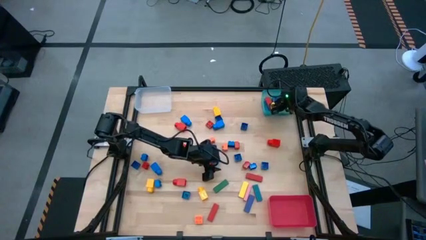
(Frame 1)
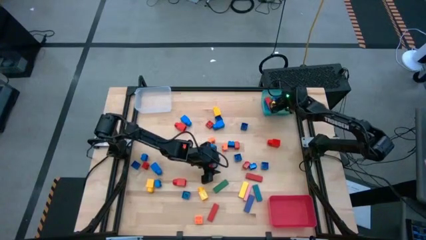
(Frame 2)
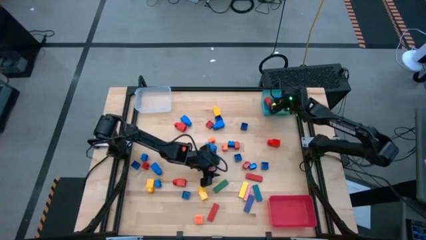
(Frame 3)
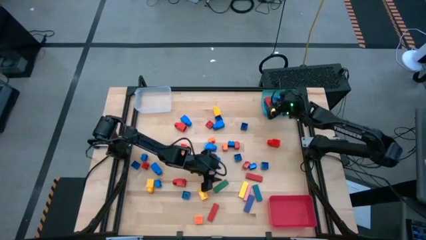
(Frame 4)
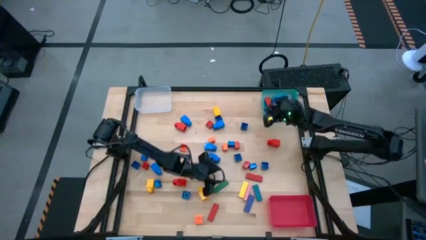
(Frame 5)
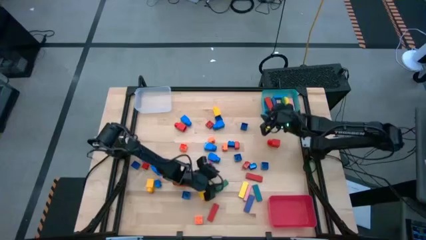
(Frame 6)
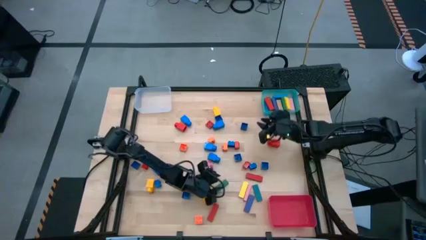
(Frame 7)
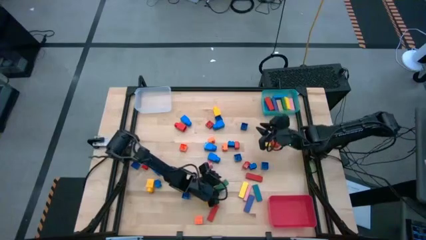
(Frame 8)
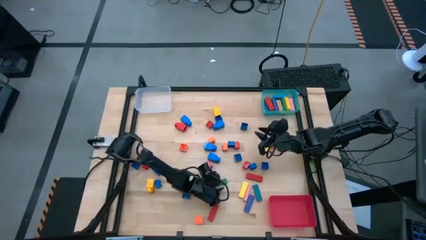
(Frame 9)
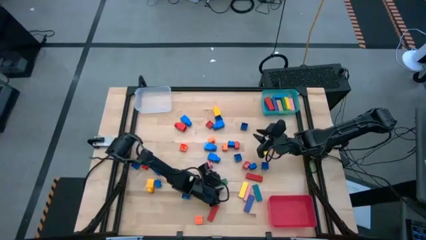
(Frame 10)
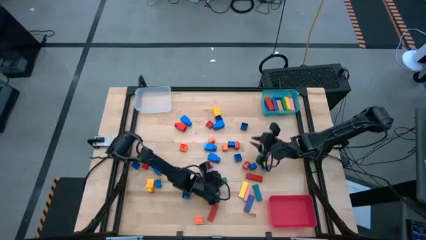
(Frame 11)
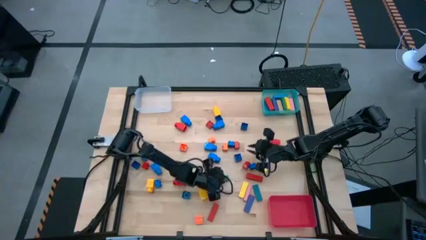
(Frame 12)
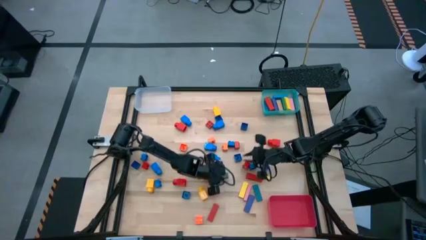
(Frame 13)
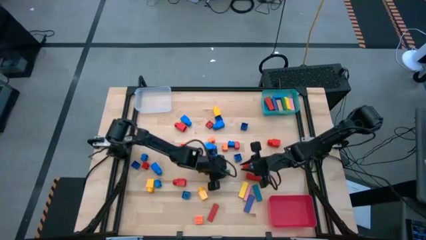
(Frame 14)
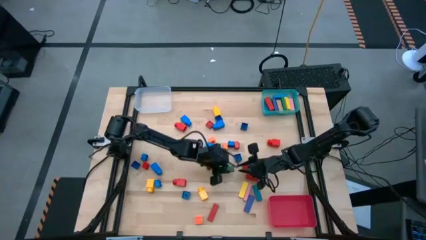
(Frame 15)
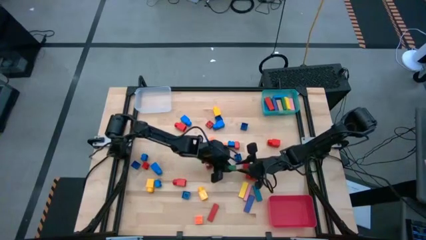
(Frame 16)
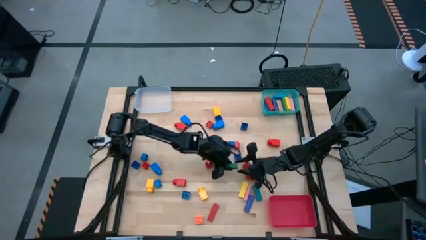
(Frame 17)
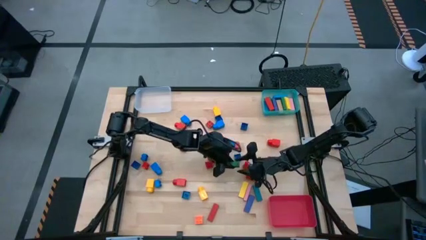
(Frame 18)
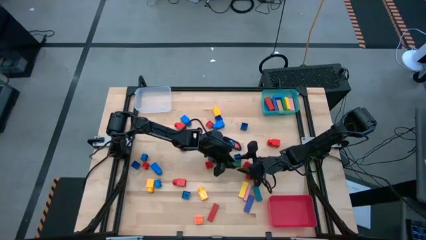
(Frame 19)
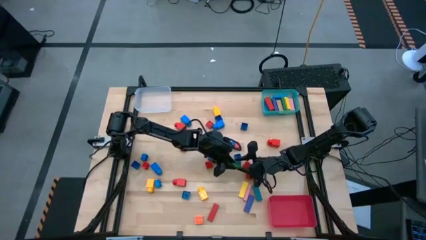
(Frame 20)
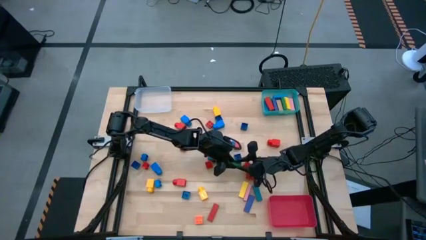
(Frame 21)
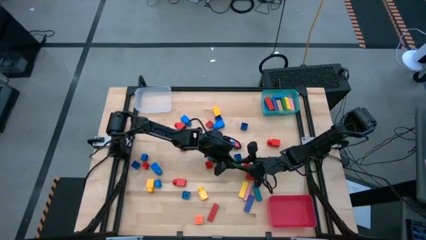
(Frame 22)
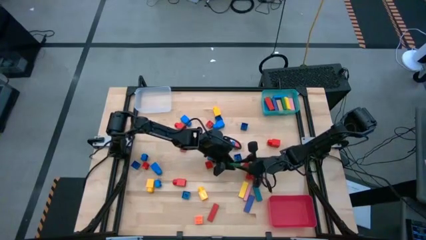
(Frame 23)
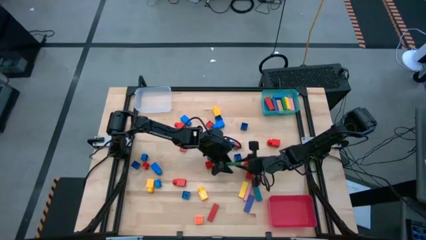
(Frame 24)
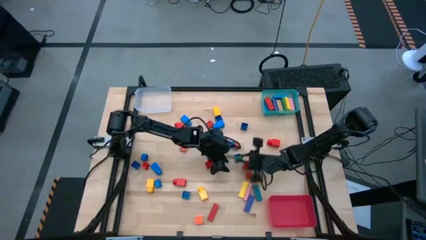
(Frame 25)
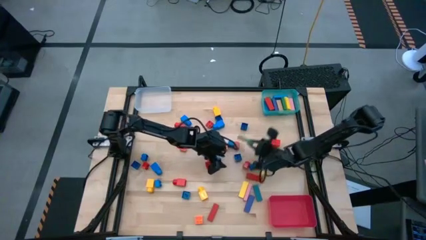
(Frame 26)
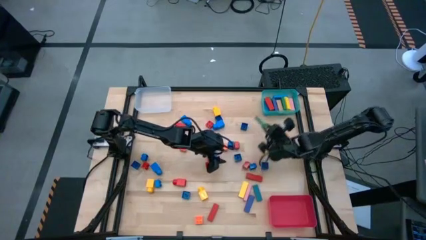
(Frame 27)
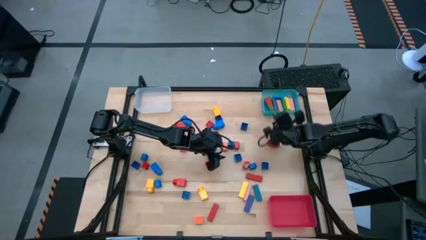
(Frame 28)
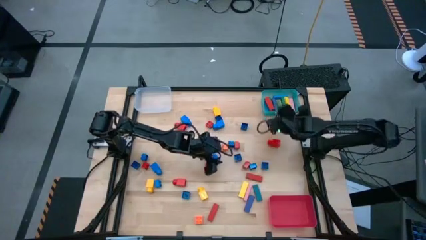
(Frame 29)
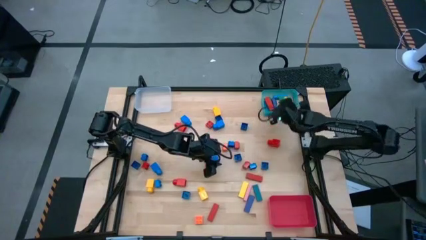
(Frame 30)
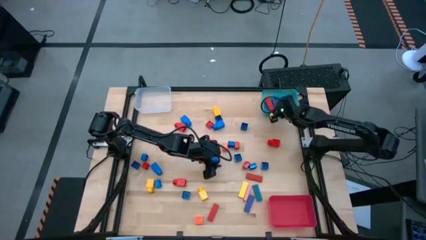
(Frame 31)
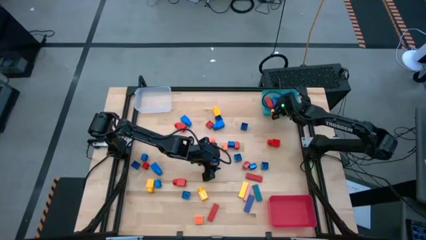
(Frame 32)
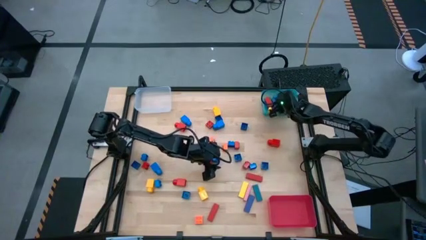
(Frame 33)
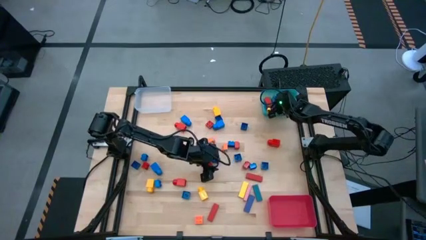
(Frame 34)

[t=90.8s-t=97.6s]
Task: Sort blocks by size
Put the green block into the blue bin

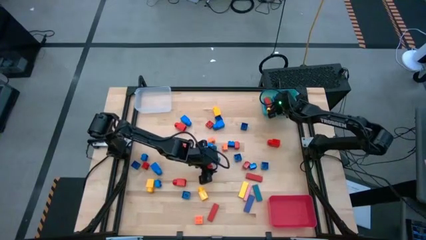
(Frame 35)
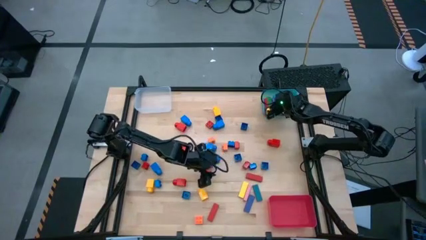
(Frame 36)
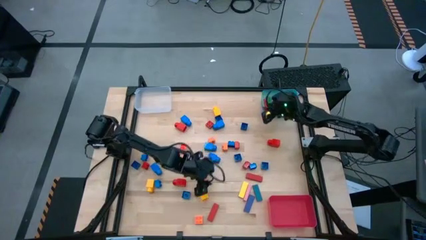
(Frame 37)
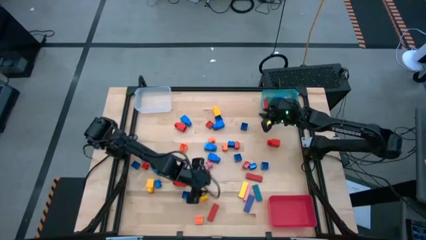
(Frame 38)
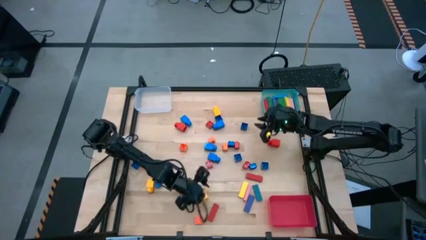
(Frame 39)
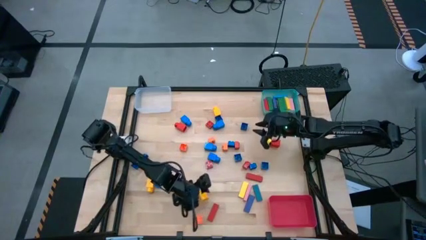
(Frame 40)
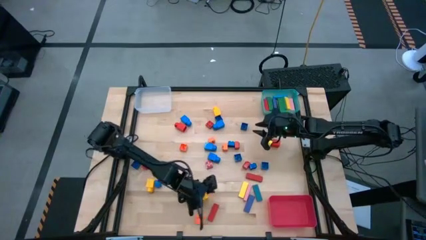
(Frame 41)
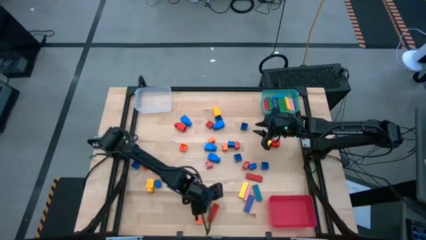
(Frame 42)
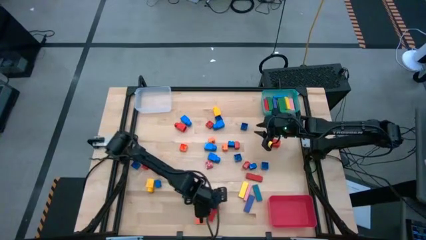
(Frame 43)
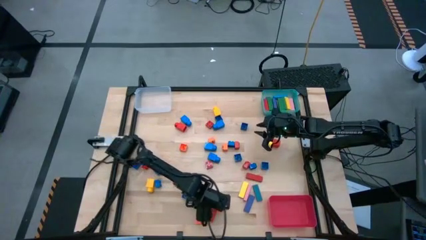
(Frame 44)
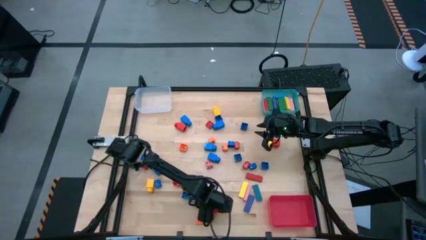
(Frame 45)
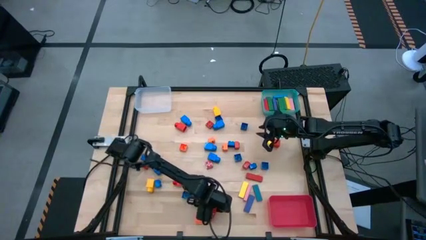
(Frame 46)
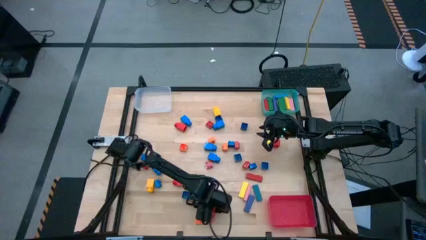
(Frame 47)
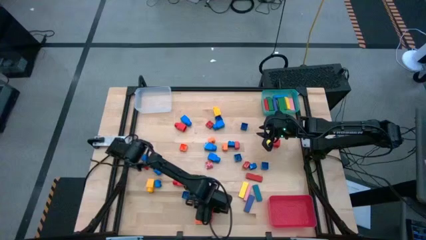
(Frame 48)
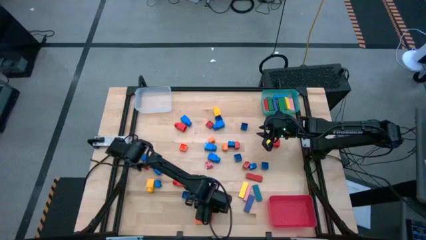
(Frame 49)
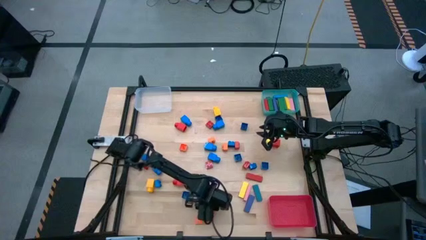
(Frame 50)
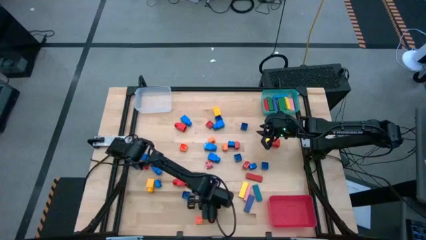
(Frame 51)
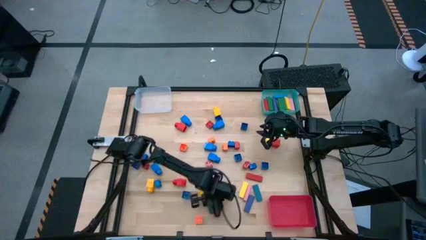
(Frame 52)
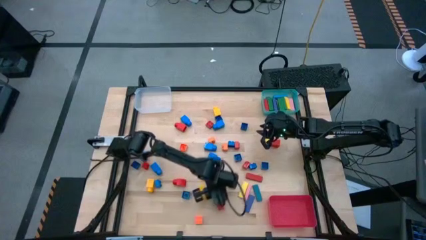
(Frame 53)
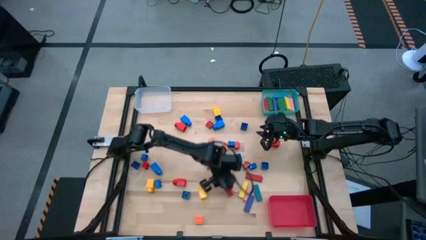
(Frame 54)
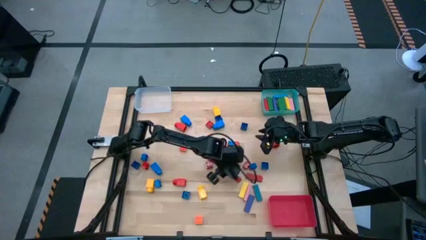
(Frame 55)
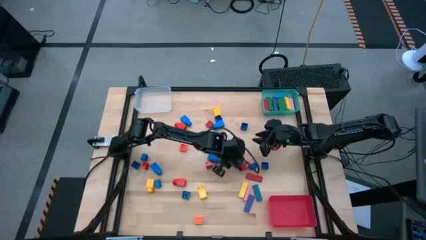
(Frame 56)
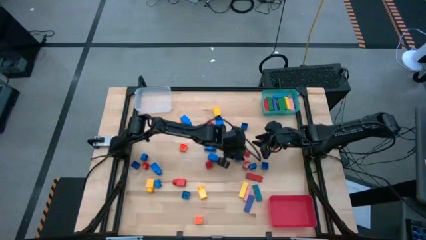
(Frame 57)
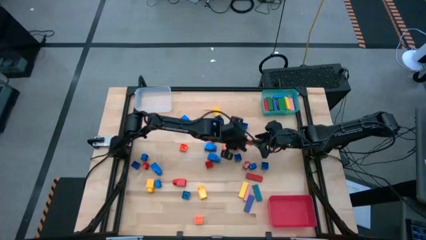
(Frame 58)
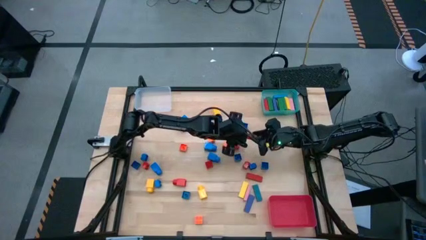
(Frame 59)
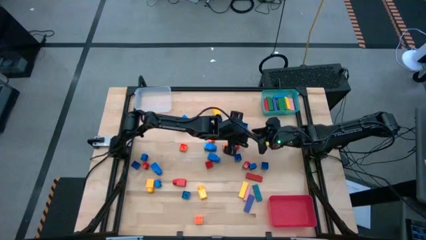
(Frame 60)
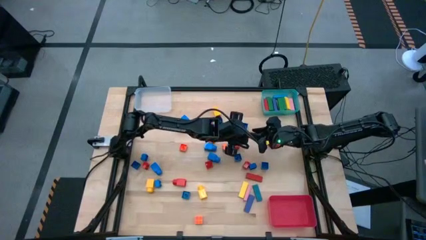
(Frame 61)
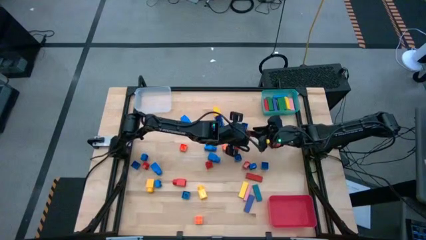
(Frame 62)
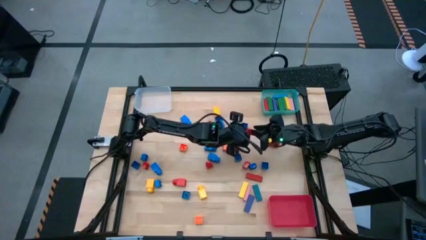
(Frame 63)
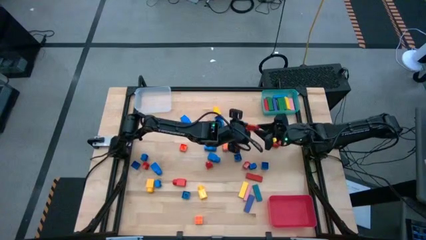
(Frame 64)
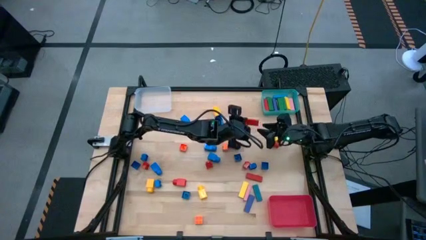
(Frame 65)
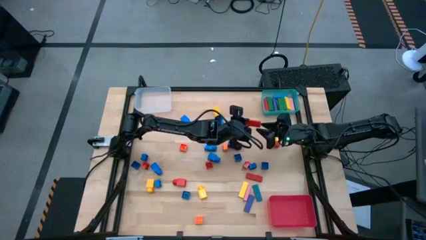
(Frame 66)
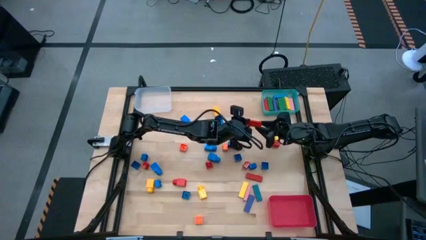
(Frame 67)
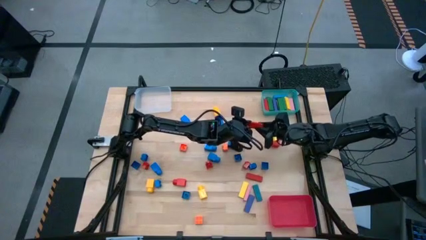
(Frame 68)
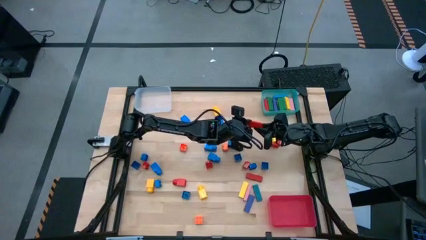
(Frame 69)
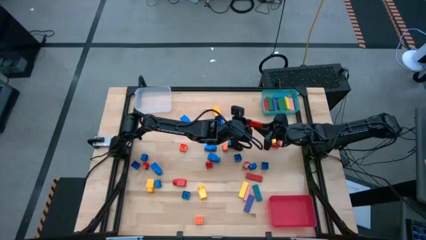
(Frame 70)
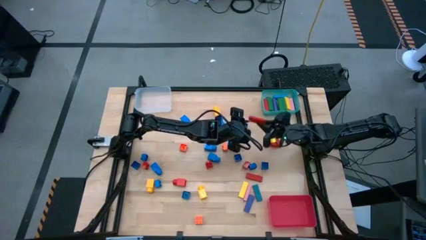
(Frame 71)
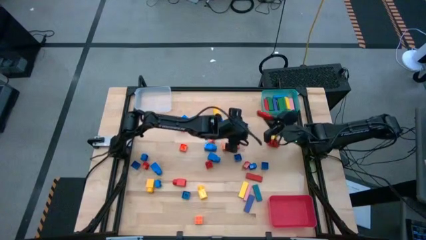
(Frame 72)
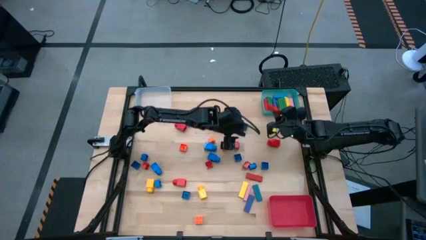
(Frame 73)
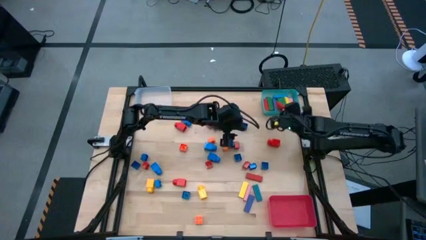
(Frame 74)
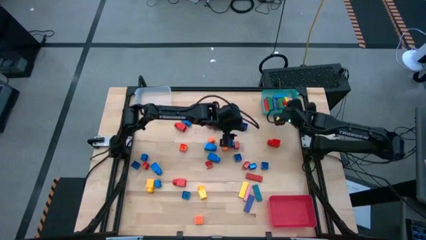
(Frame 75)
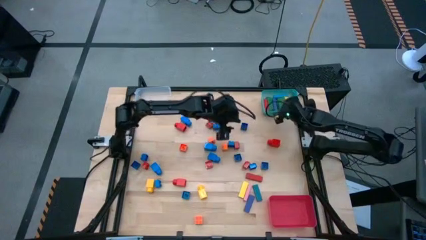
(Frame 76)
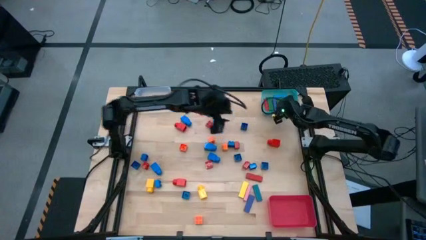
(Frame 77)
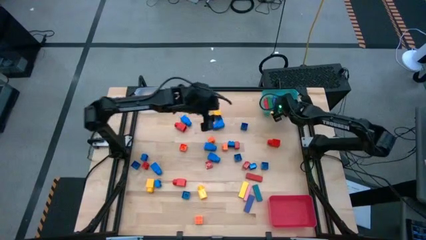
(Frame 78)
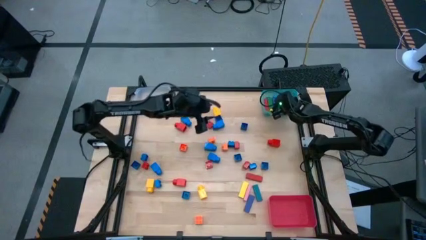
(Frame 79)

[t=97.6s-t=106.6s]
Put the red block into the blue bin
